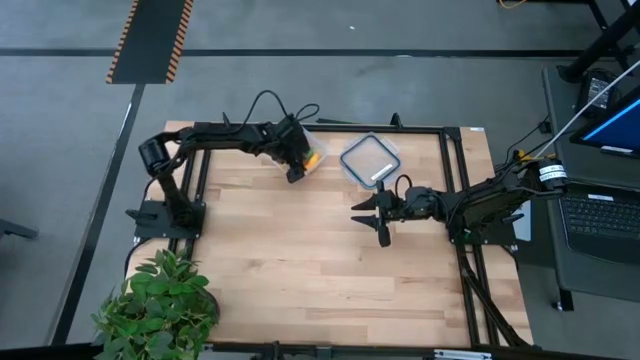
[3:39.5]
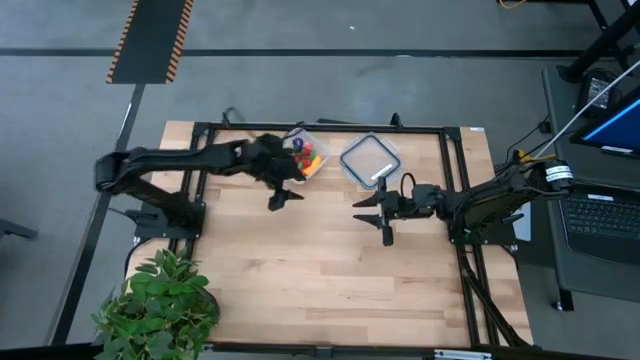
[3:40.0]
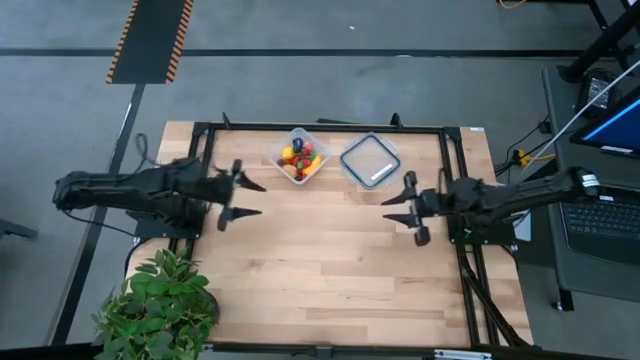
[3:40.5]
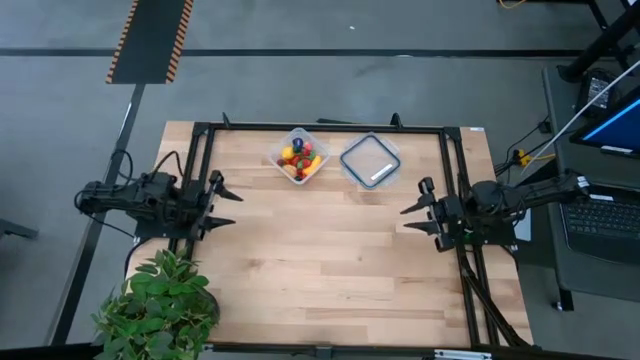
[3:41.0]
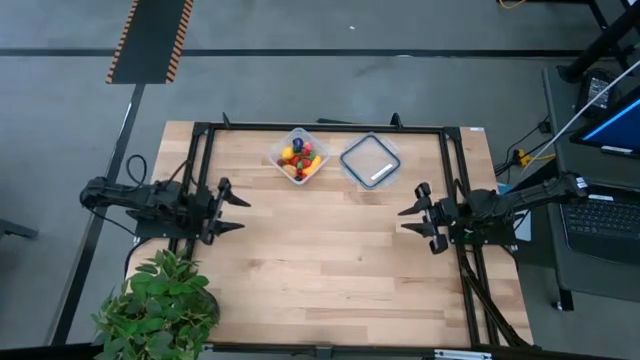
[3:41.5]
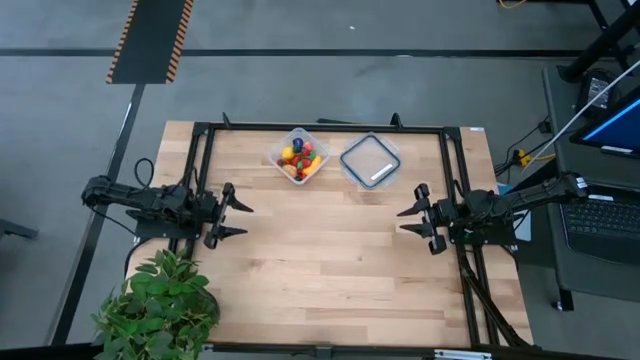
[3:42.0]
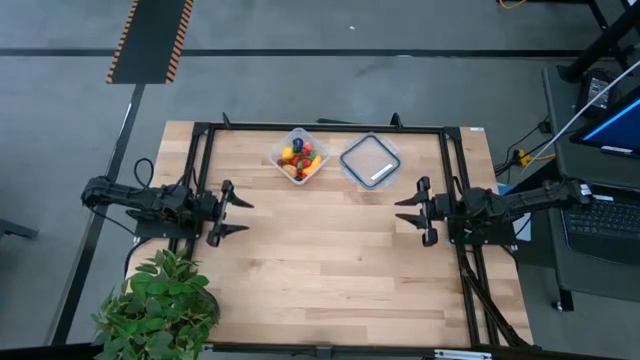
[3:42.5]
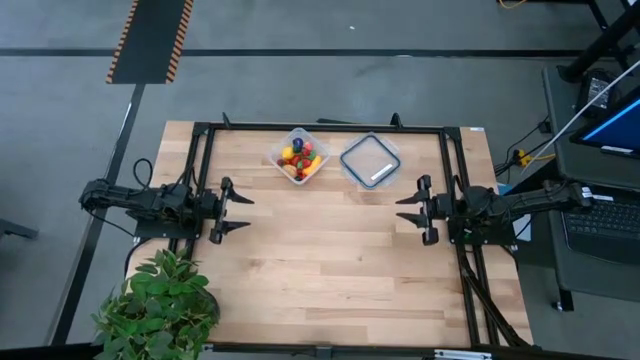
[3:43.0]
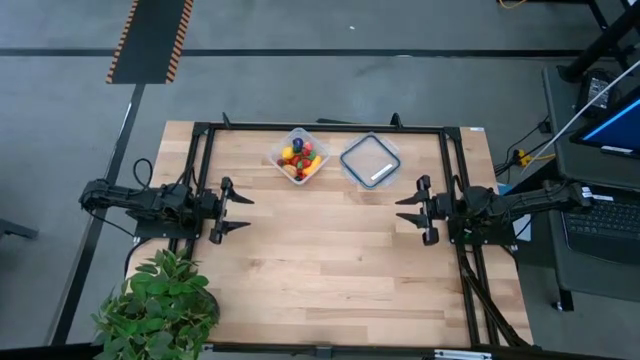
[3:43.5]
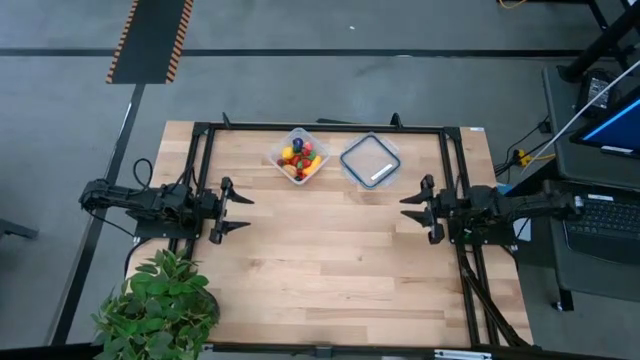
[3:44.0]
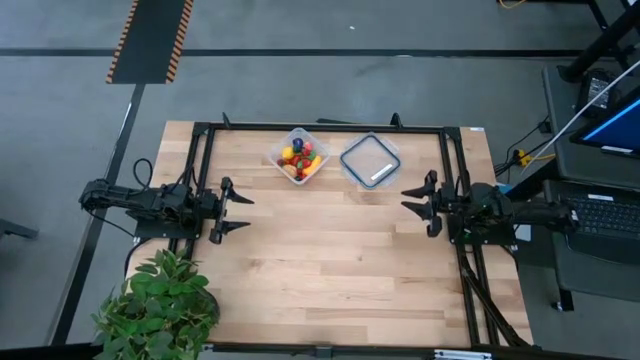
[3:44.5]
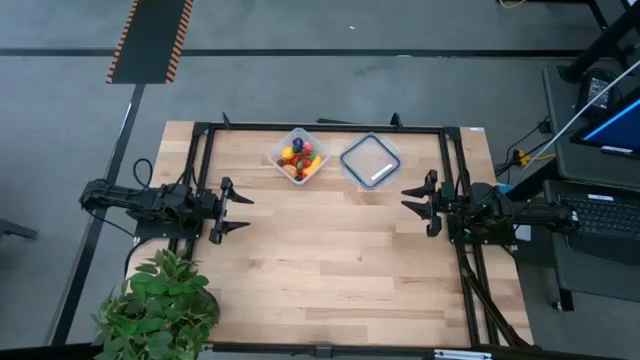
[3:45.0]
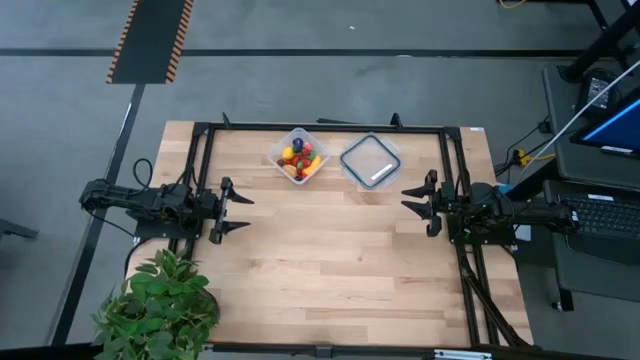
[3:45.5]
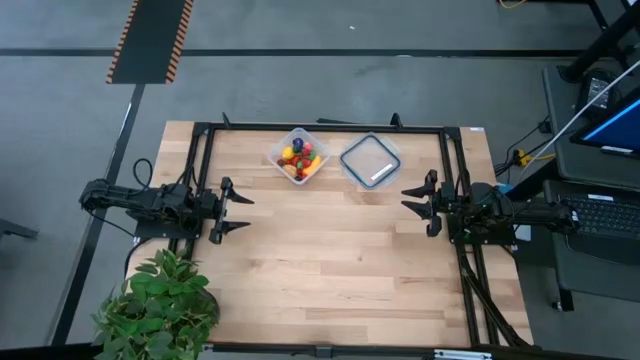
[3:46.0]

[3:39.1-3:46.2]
Task: Pick and placing Produce into tupperware
Return to Home Position

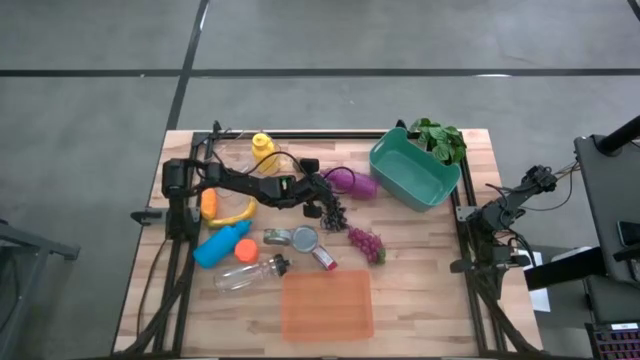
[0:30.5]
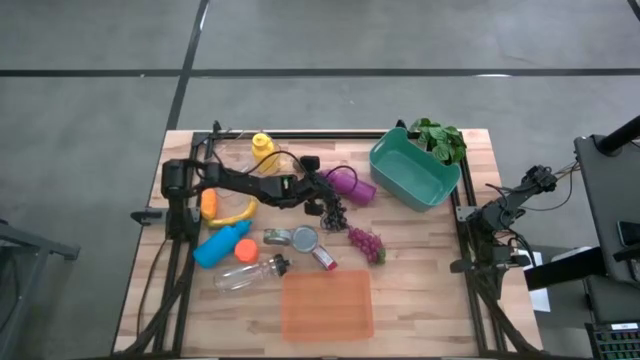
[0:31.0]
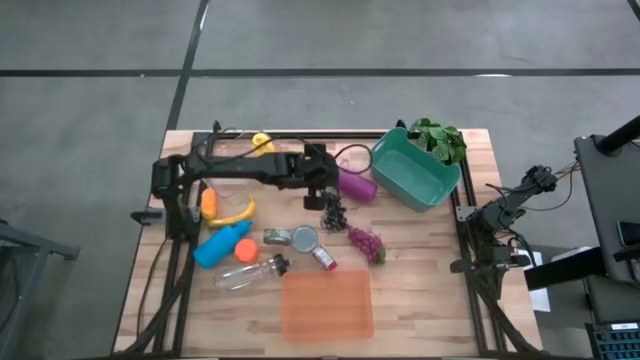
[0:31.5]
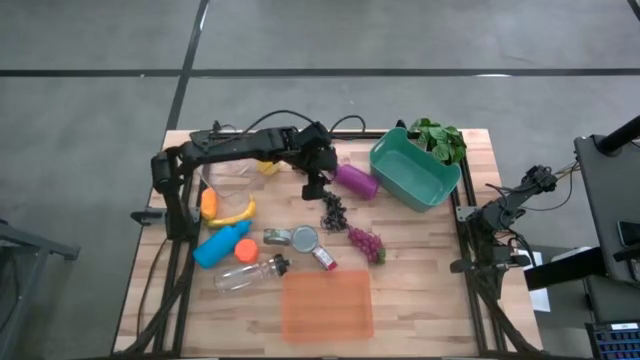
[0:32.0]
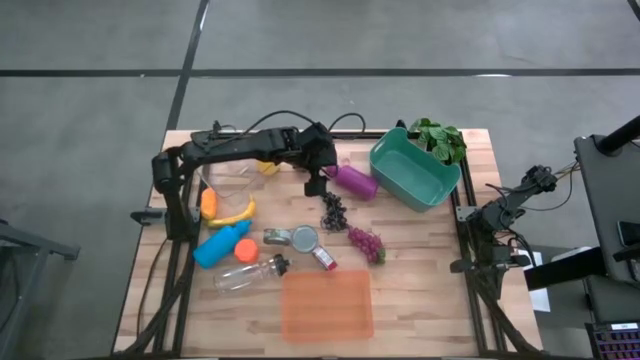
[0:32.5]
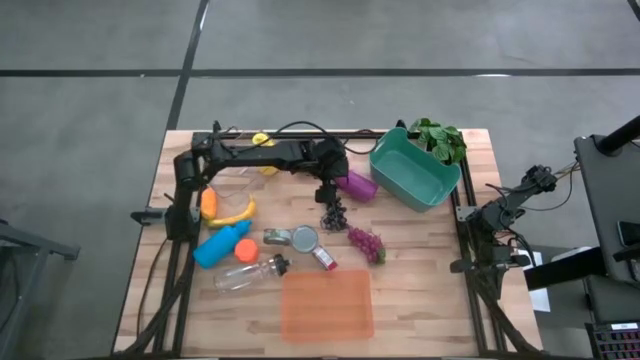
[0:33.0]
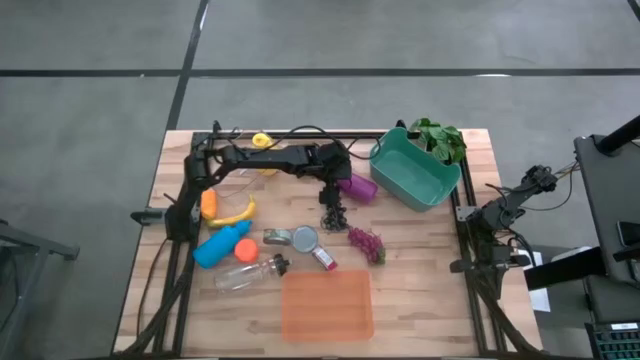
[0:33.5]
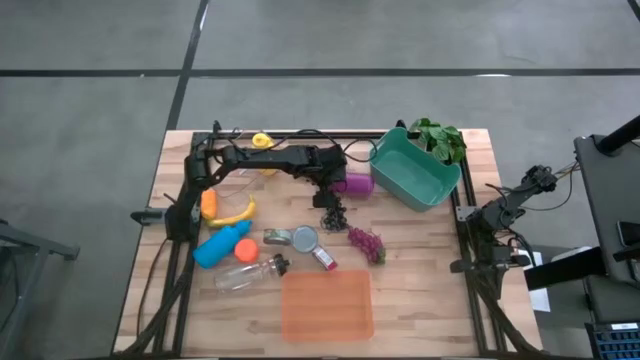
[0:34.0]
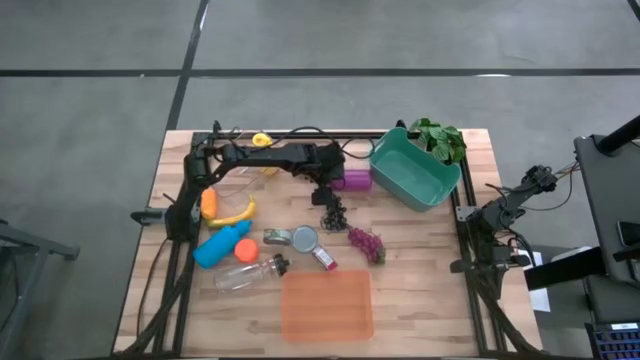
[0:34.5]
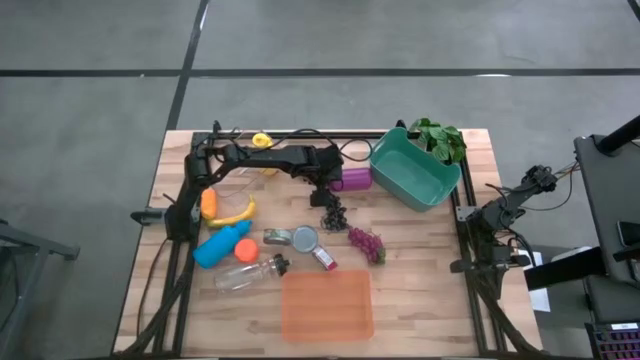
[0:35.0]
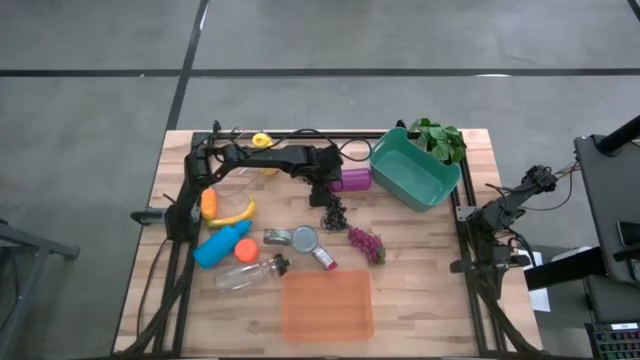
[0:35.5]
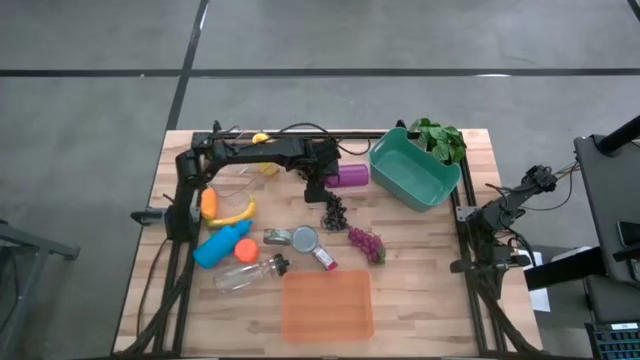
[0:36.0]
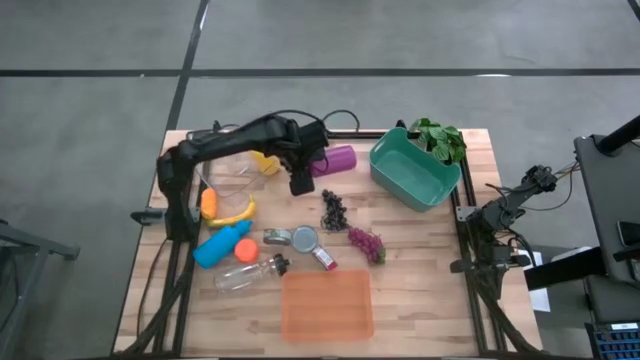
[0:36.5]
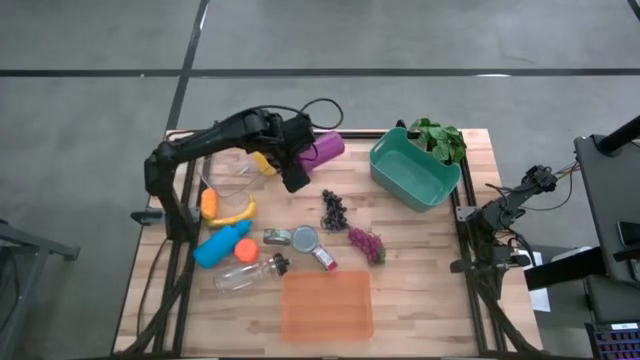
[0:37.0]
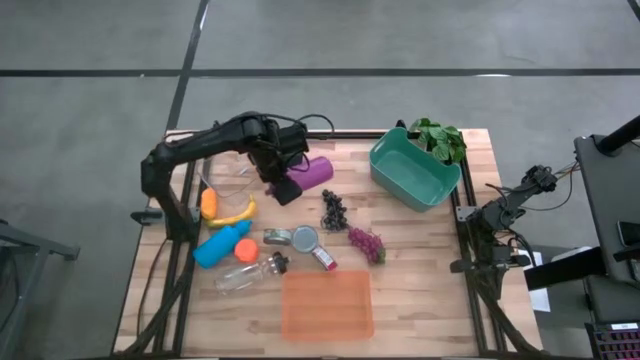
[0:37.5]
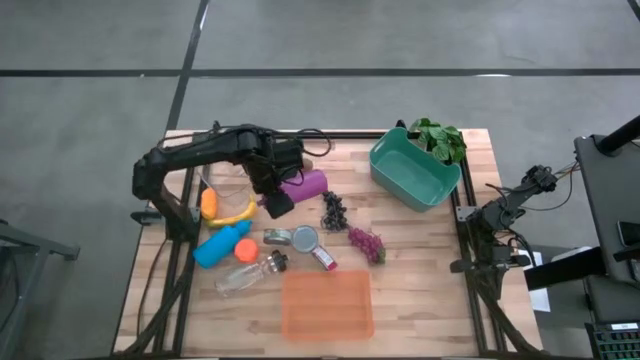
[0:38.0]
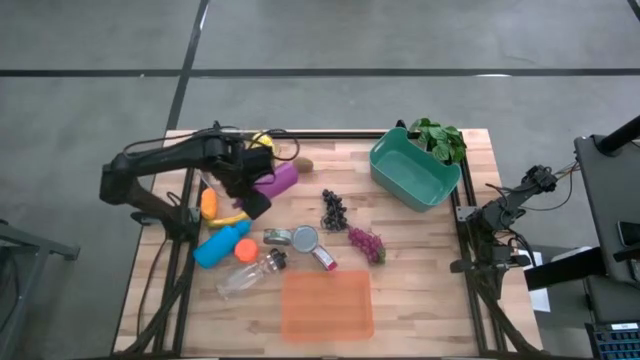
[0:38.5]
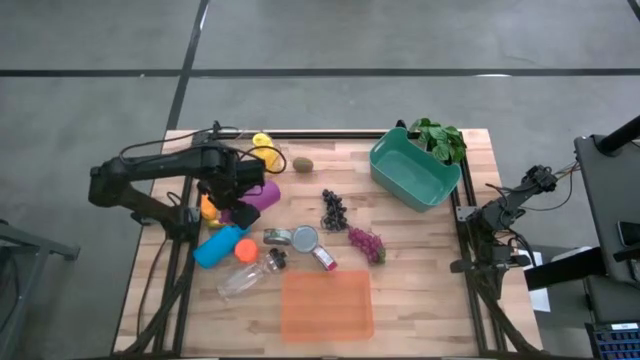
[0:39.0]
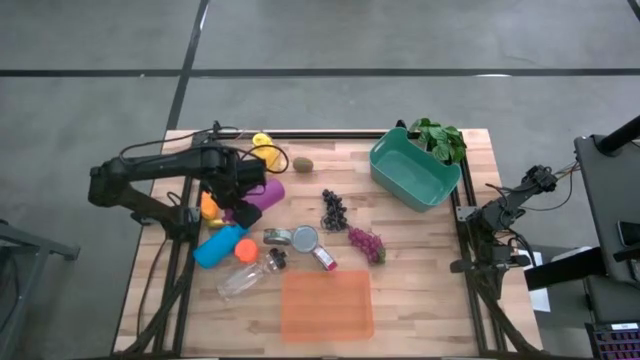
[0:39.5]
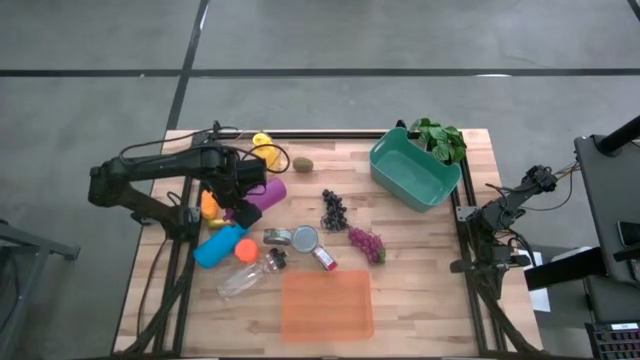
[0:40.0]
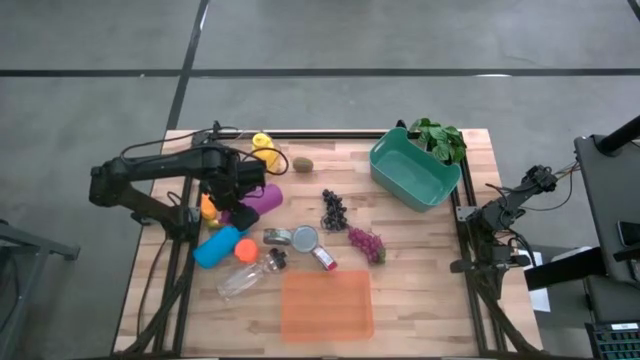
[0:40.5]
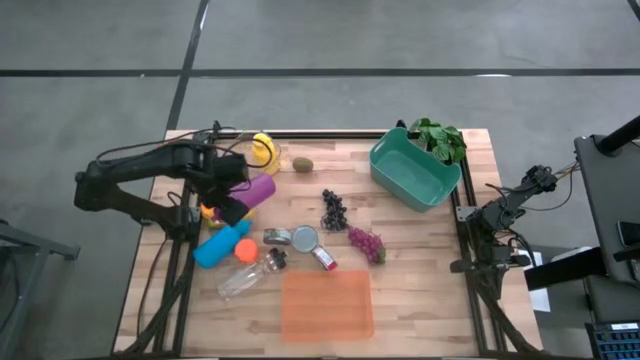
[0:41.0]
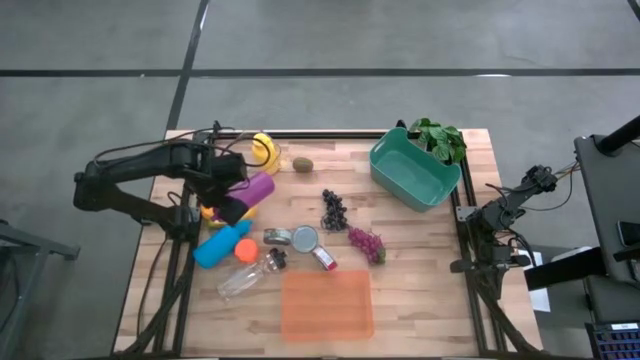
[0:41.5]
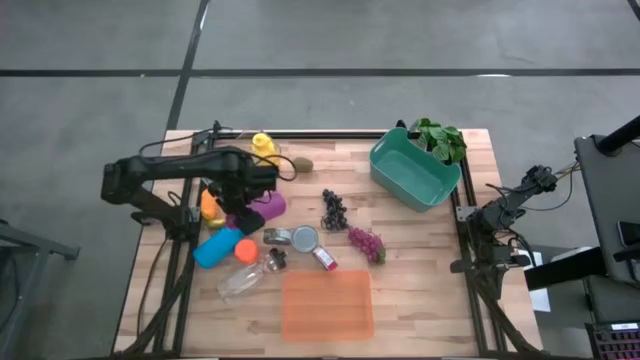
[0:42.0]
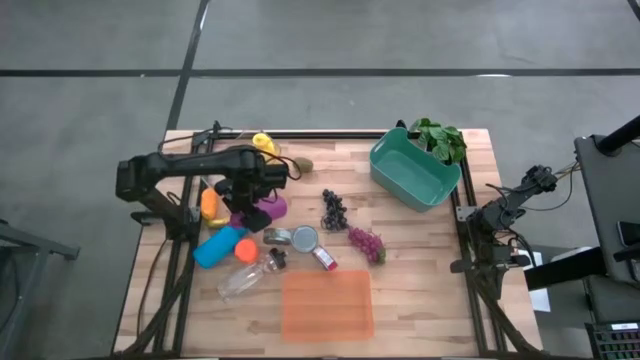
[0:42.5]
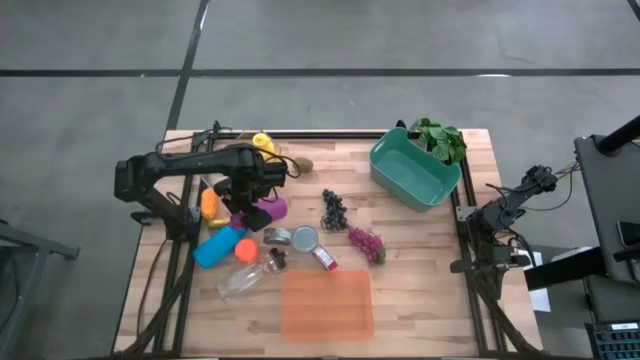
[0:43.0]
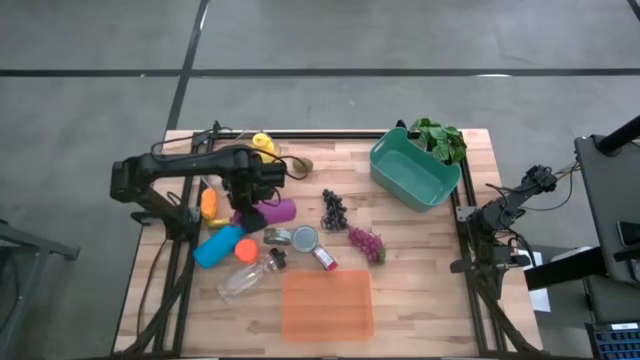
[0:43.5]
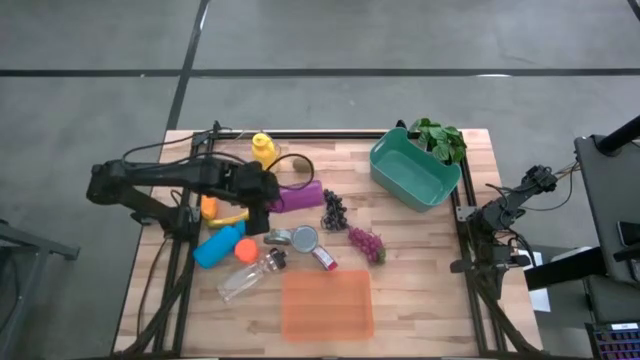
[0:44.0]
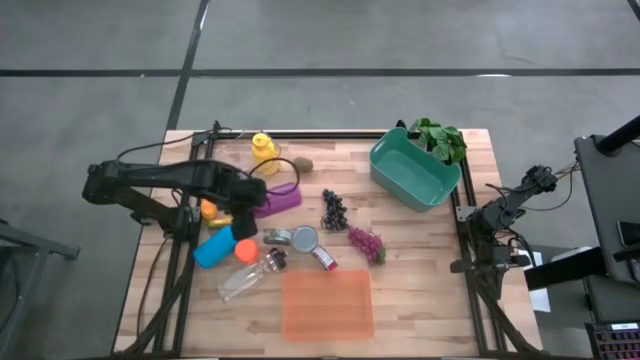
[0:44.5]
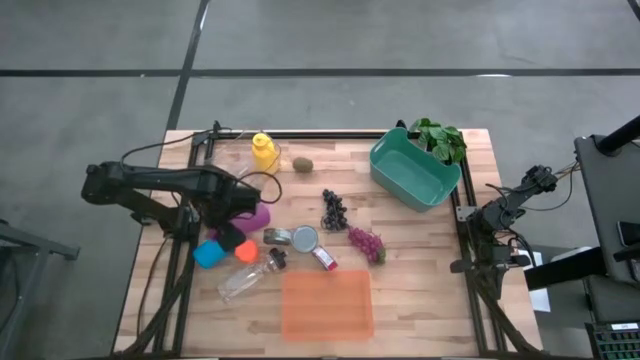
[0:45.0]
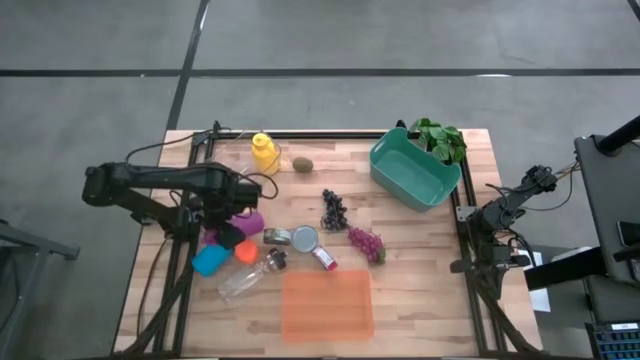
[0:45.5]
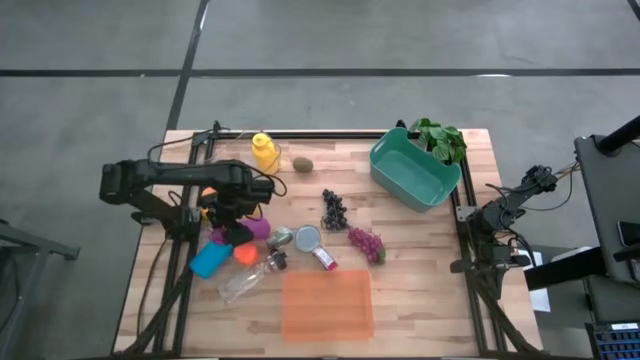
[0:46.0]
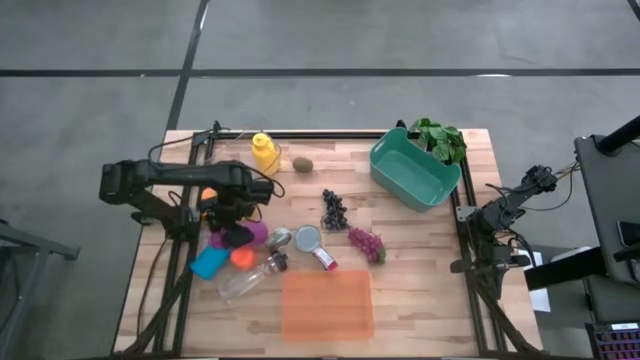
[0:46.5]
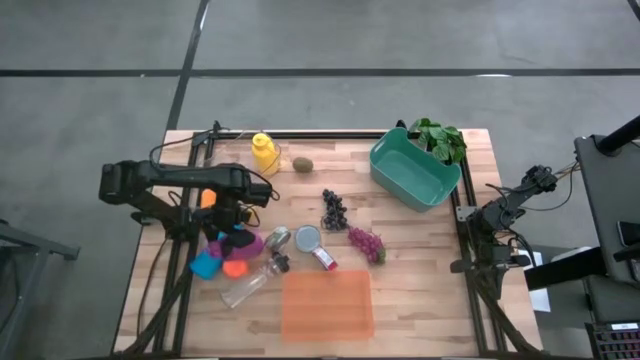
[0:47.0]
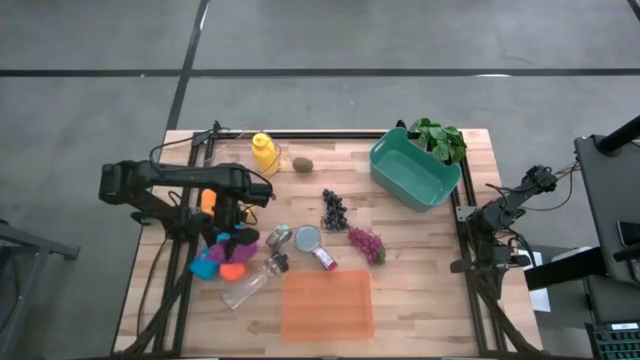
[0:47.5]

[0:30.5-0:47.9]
Task: Pick & Place Food Item
Put the purple water bottle into the transparent bin
